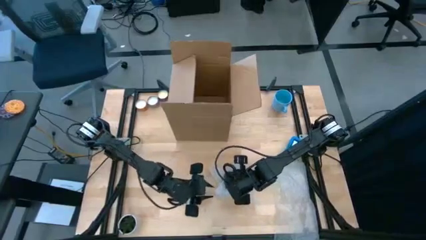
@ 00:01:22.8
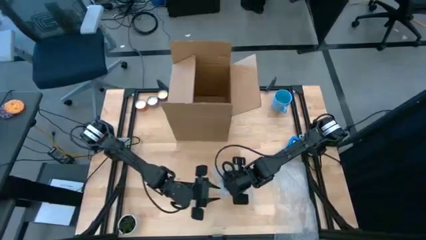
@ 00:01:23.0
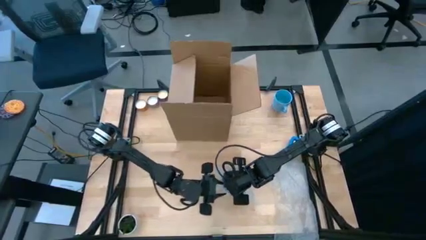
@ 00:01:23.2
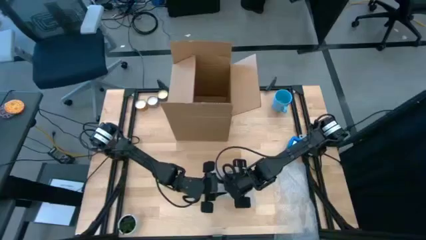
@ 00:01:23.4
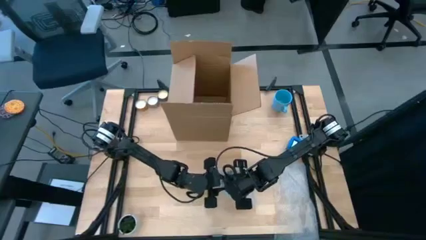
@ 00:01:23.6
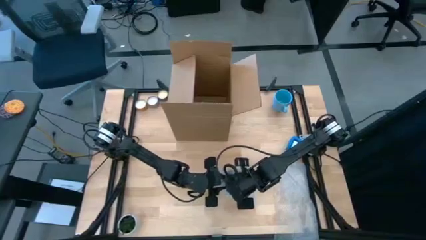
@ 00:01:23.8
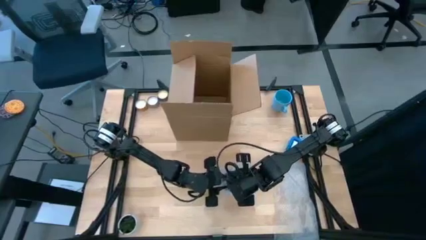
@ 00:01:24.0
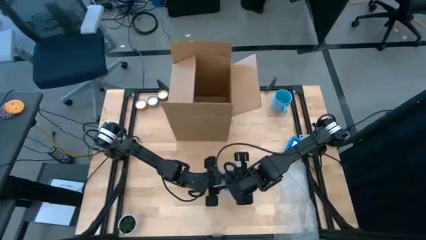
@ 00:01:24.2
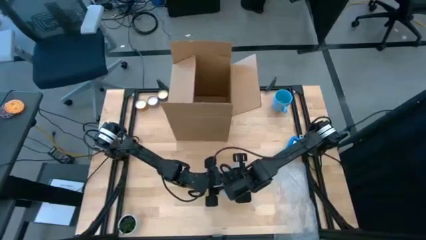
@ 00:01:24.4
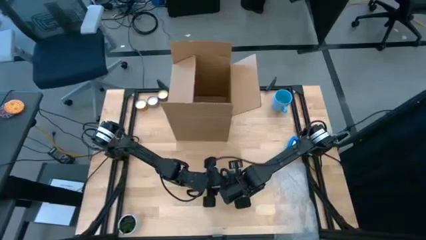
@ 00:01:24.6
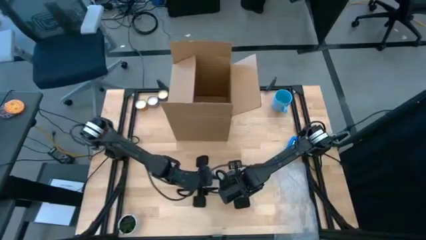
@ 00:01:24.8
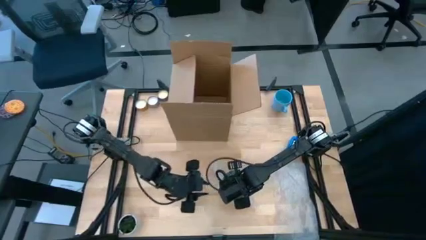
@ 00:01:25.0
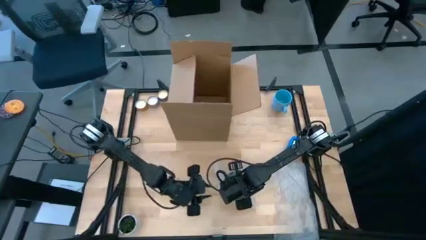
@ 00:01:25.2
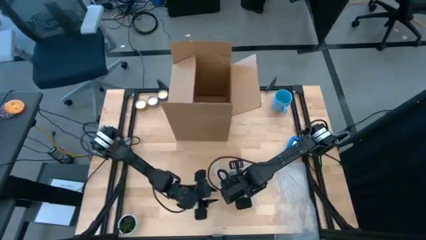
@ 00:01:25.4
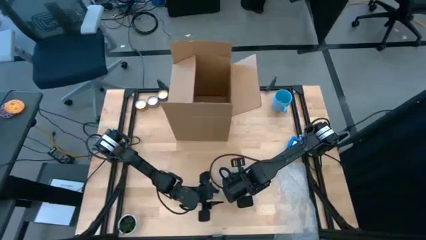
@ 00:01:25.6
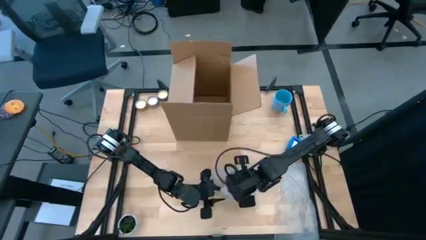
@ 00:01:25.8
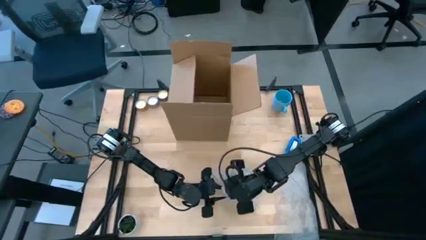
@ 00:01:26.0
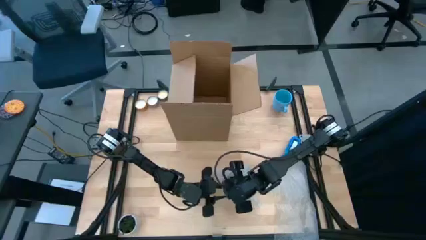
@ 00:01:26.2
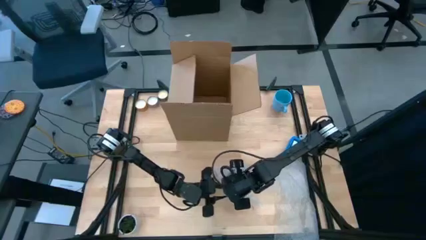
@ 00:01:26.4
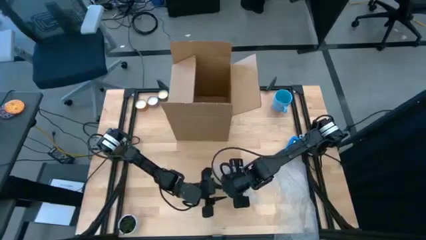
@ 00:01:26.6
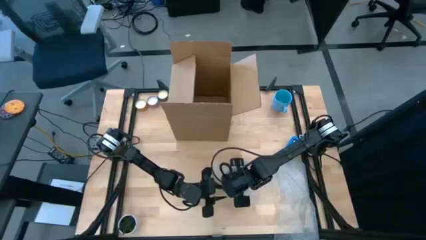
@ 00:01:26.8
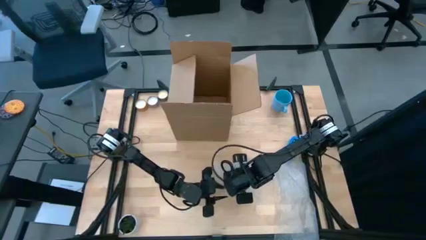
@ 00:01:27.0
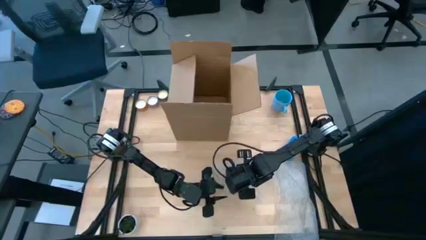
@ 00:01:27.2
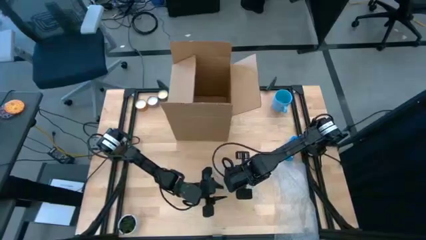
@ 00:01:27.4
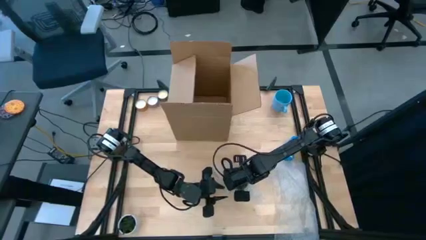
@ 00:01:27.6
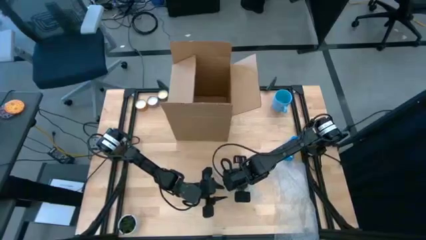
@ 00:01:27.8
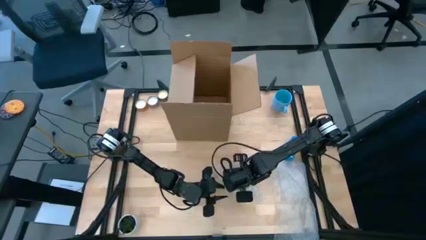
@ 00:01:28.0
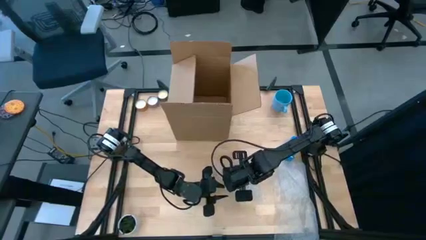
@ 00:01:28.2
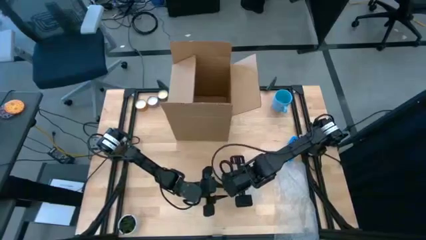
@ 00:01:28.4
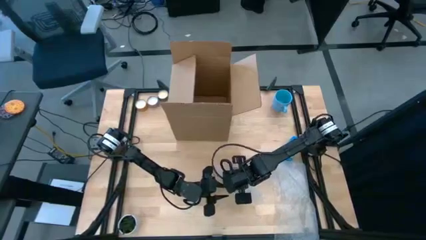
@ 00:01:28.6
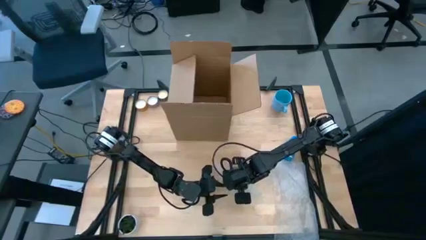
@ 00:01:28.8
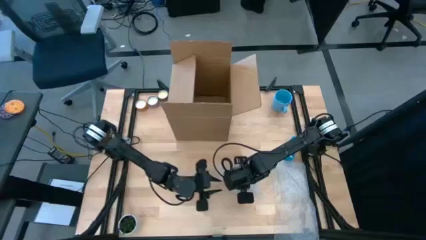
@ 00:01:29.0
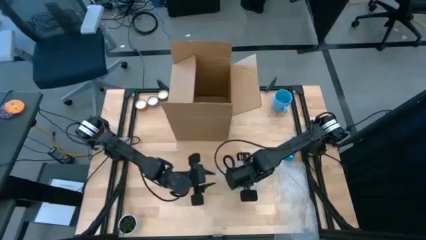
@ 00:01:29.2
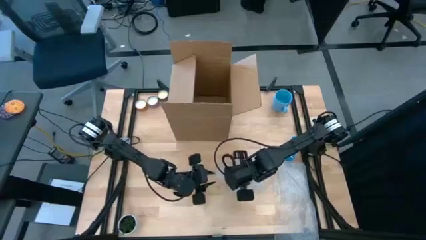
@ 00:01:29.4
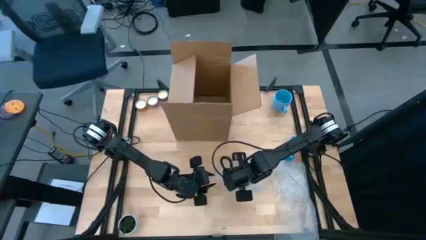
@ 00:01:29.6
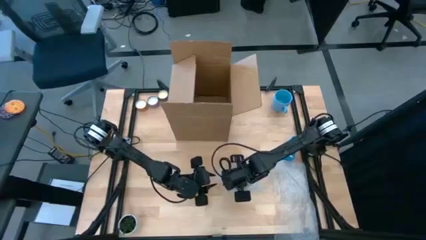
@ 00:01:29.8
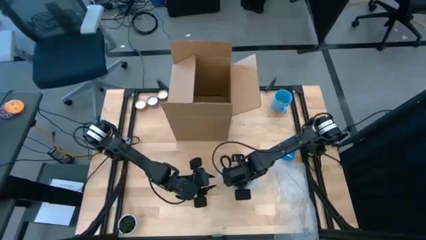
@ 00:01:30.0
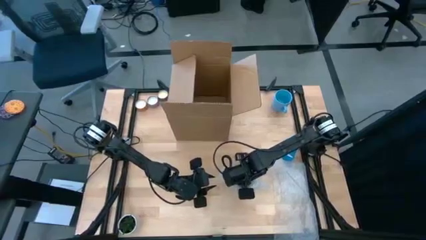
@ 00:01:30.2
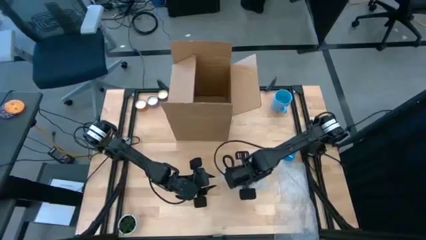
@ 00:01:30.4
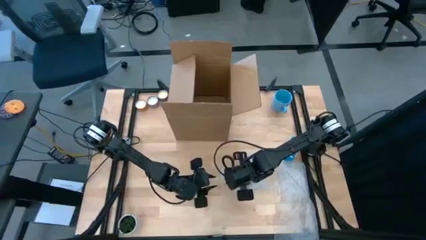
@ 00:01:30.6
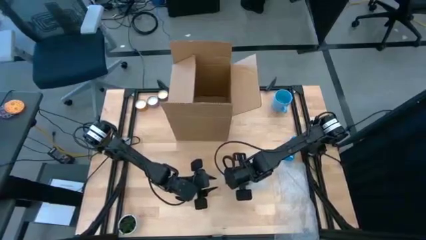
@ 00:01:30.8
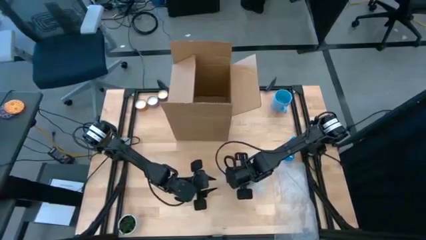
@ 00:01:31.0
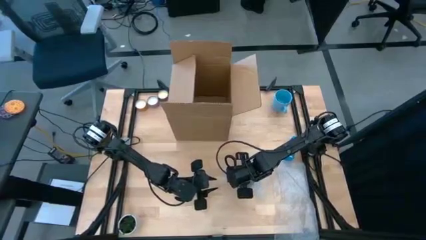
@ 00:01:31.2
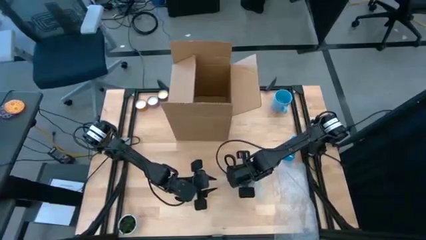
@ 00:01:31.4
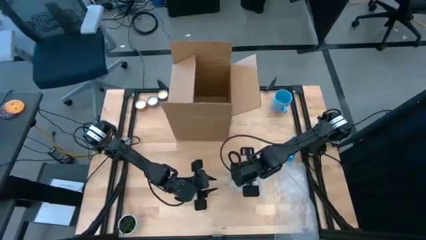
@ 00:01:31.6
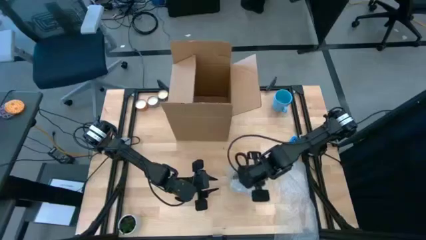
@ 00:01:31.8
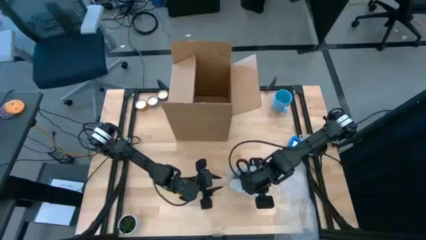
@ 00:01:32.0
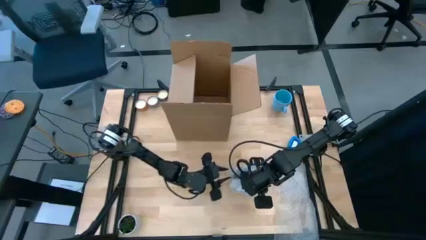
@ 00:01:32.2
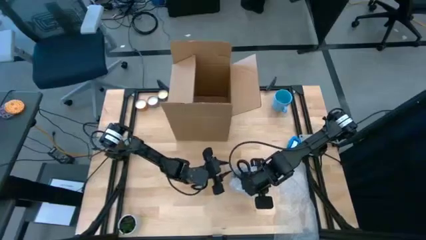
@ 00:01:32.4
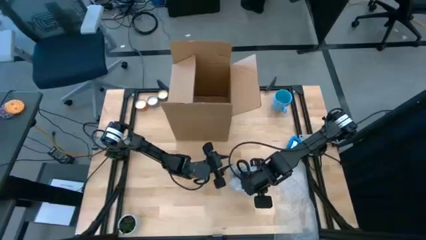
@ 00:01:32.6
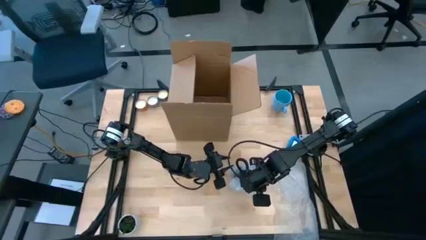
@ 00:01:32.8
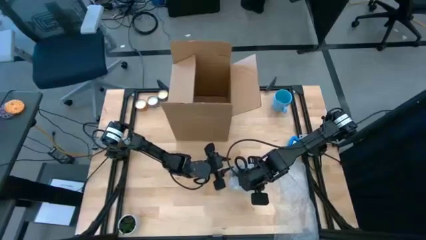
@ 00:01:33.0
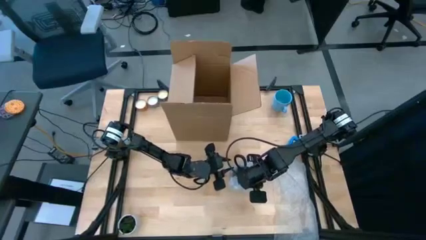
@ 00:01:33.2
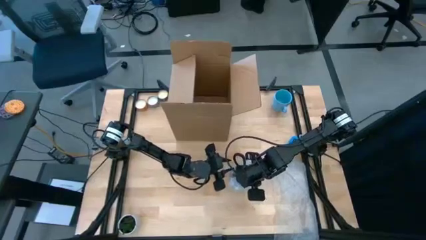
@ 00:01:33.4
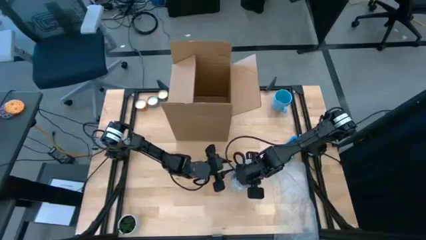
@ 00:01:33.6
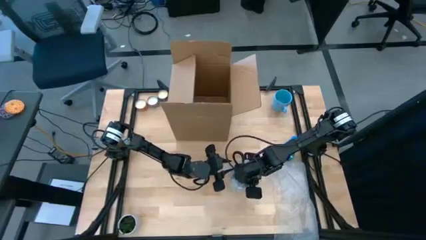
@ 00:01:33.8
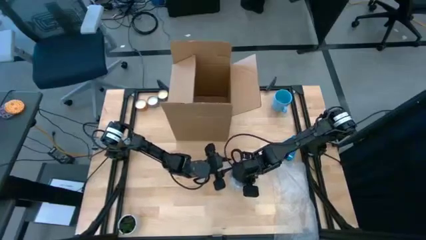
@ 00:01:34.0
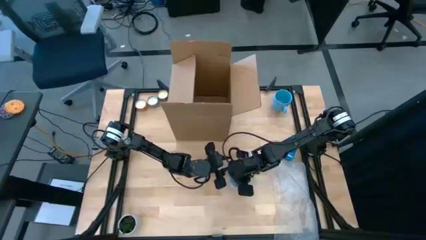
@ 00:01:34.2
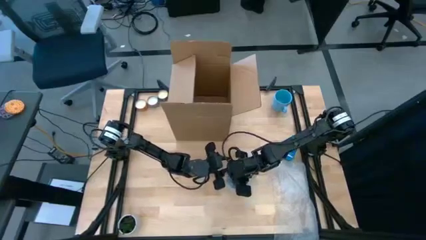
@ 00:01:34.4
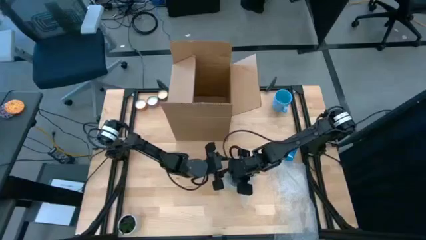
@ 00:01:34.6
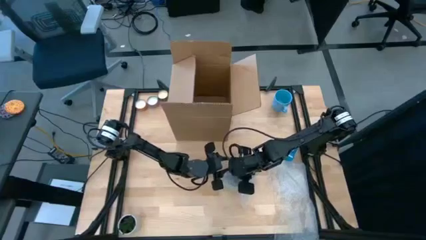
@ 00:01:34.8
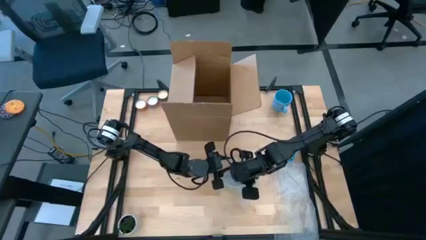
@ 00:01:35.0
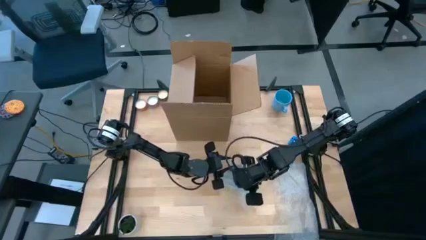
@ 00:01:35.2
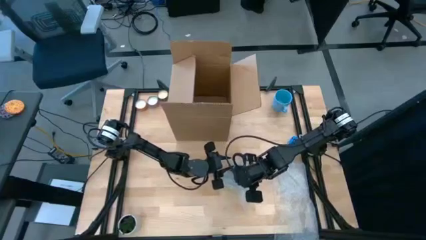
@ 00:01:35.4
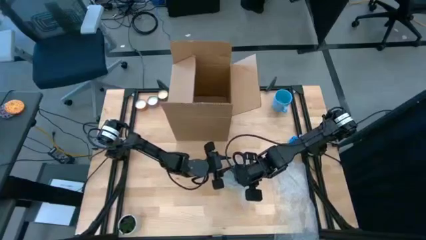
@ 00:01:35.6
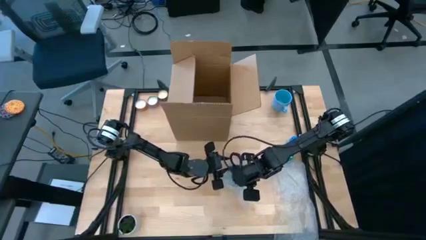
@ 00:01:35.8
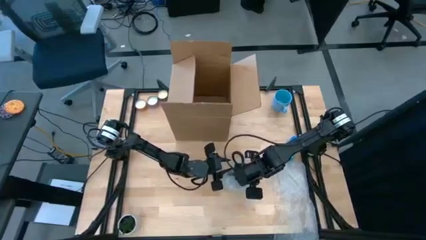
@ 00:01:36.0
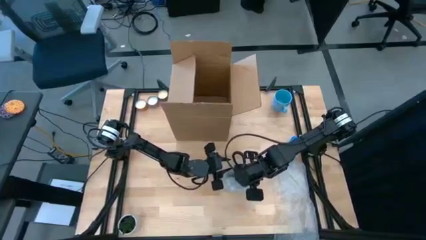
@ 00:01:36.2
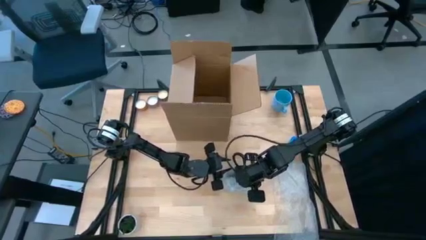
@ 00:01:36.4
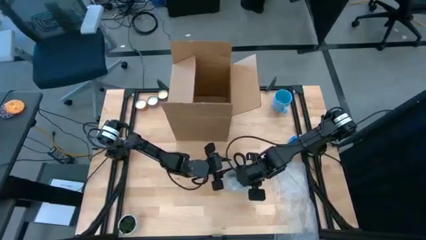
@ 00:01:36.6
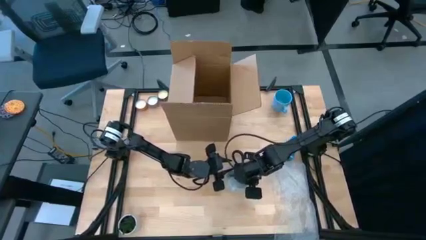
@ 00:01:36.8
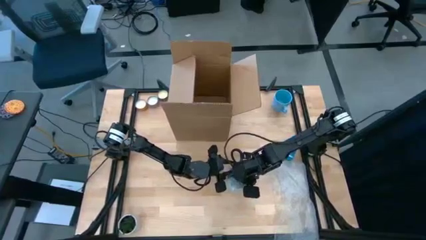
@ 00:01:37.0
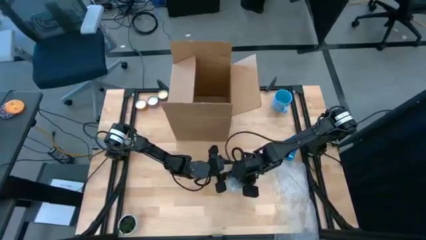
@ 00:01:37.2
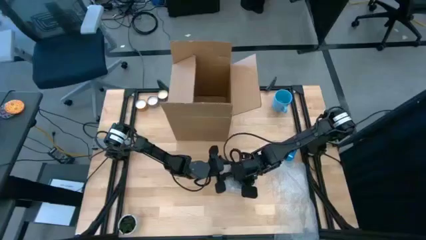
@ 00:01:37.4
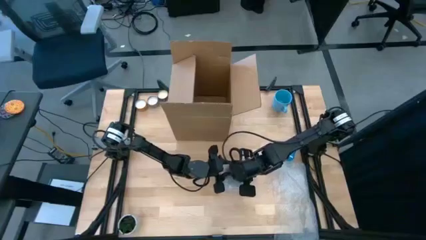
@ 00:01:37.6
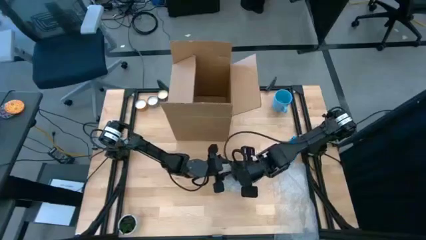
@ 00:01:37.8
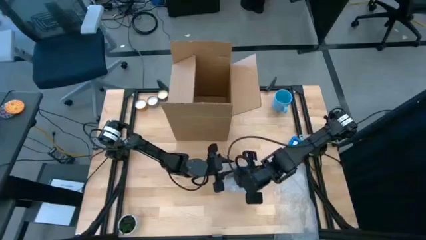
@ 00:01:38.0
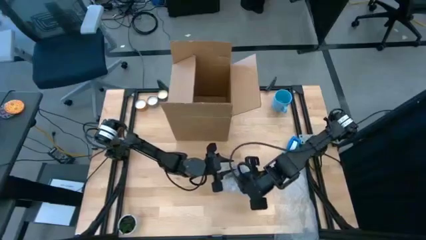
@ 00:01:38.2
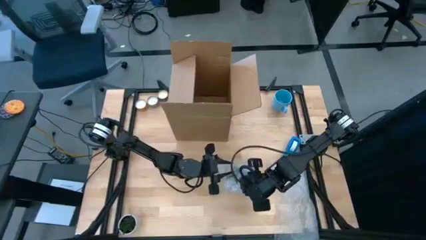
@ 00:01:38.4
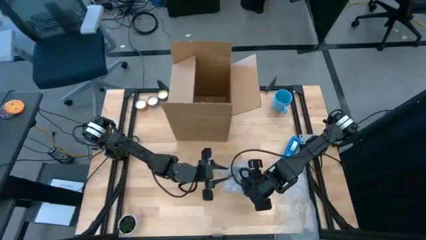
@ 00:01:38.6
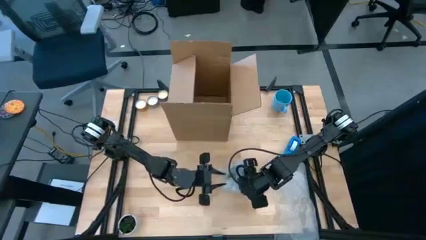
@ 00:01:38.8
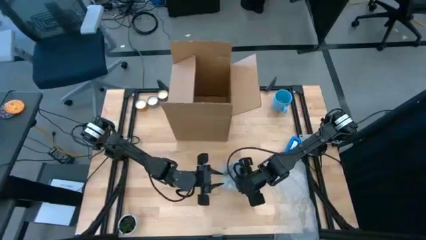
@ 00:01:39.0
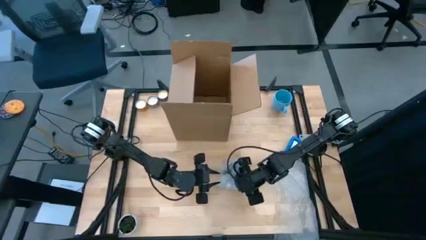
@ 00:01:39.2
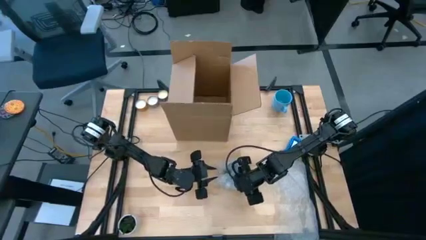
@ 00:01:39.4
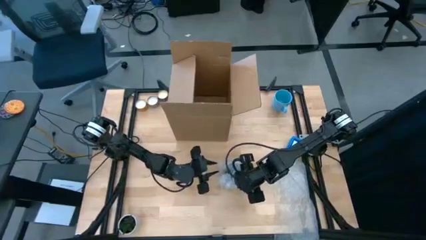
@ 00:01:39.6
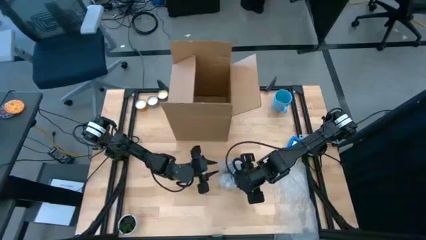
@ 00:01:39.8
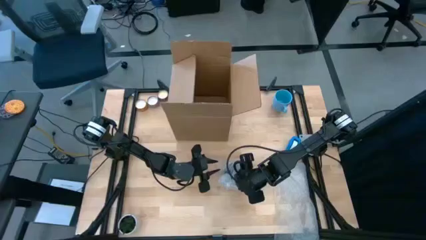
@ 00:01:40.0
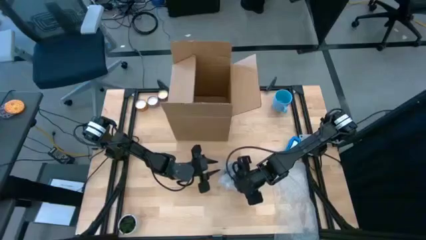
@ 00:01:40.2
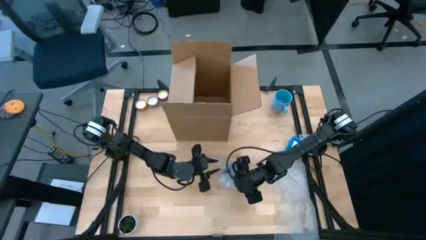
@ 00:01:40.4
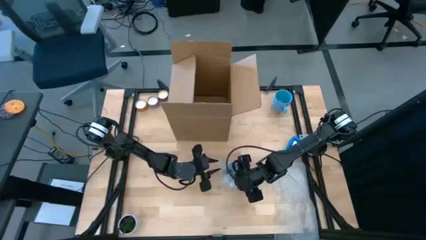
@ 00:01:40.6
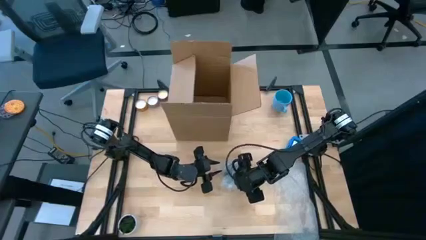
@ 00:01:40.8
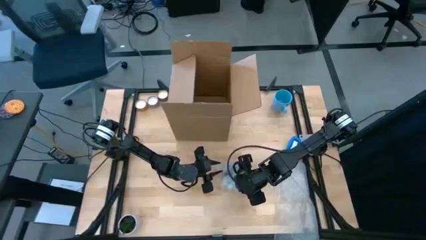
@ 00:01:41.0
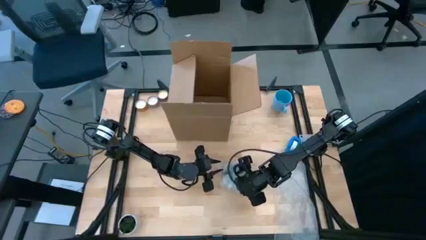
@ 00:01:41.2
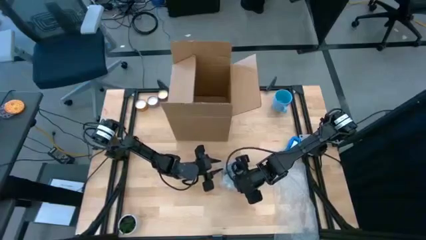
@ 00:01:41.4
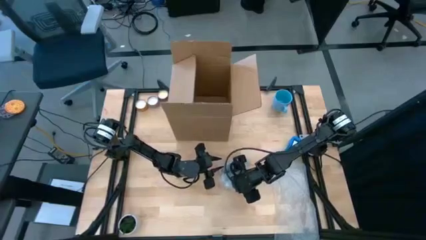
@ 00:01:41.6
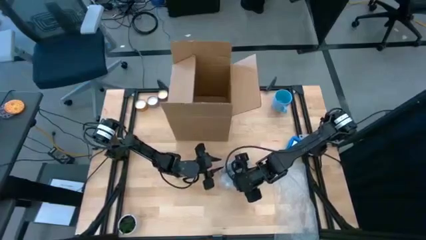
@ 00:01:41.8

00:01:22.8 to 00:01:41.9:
Task: wrap mug
Wrap the brown cup with bubble wrap
